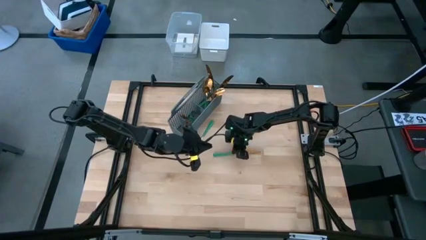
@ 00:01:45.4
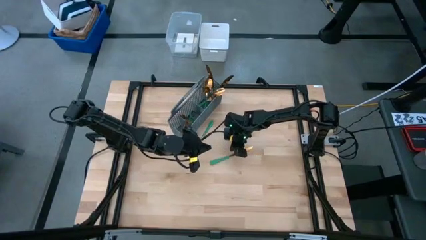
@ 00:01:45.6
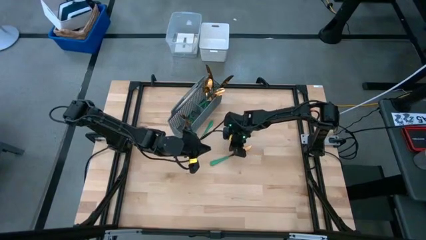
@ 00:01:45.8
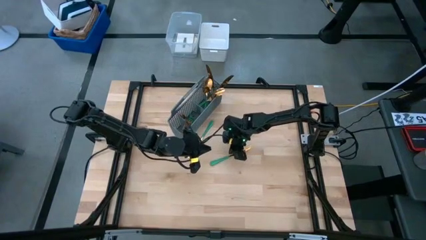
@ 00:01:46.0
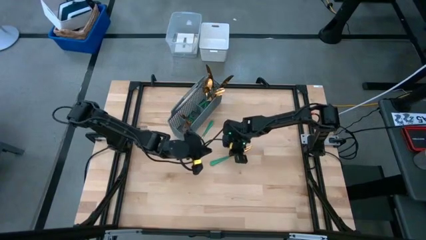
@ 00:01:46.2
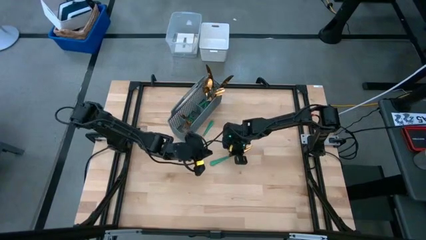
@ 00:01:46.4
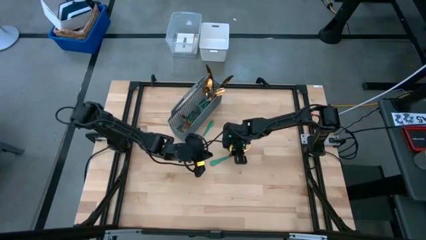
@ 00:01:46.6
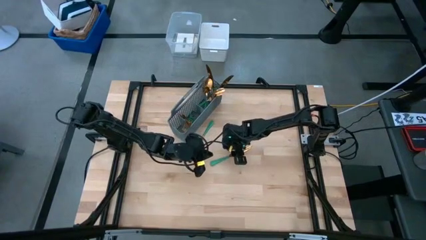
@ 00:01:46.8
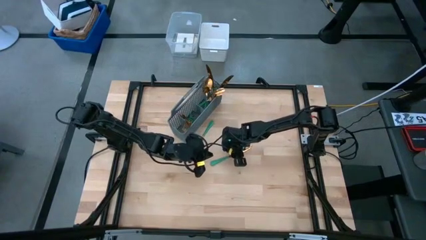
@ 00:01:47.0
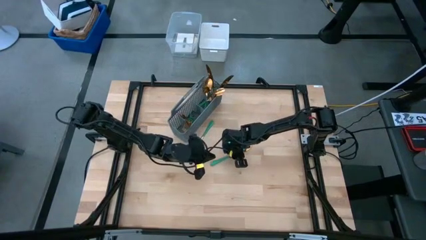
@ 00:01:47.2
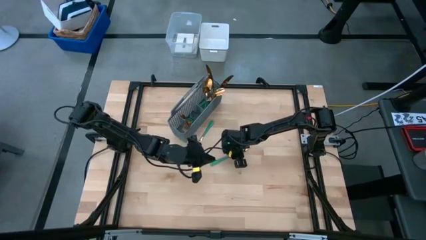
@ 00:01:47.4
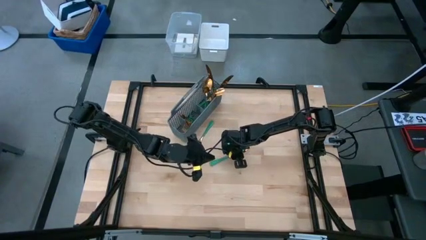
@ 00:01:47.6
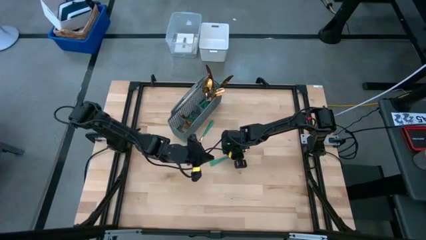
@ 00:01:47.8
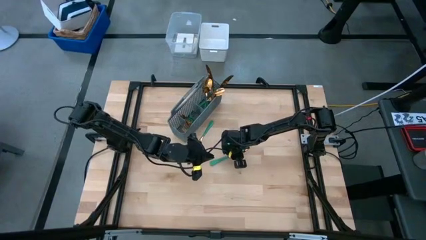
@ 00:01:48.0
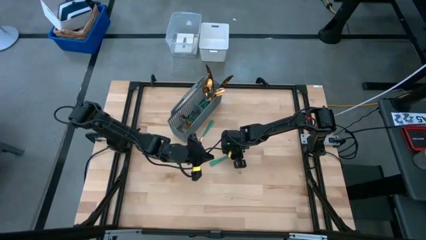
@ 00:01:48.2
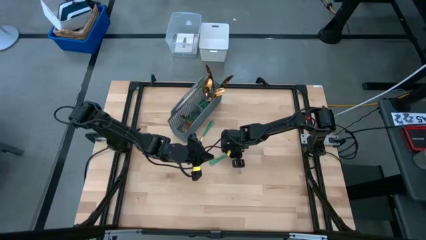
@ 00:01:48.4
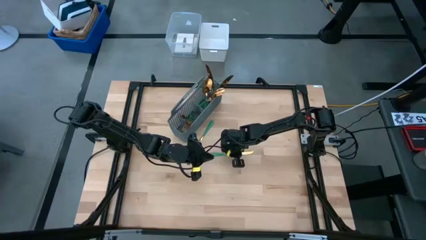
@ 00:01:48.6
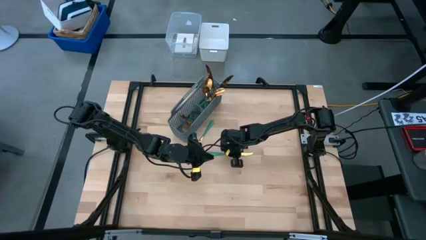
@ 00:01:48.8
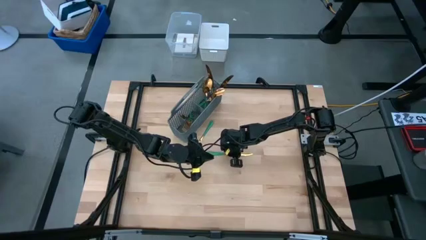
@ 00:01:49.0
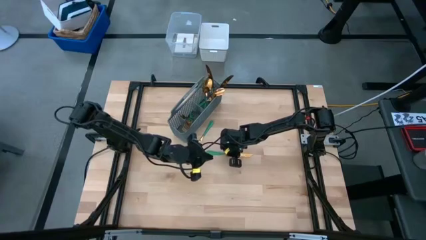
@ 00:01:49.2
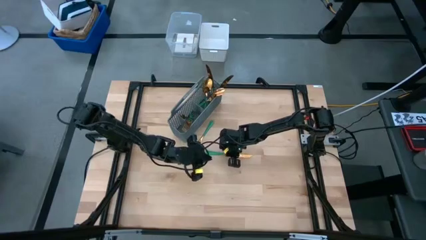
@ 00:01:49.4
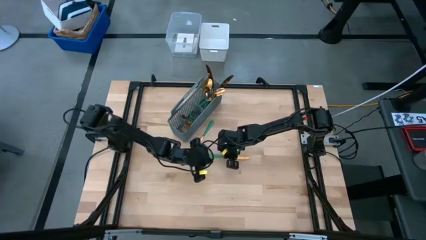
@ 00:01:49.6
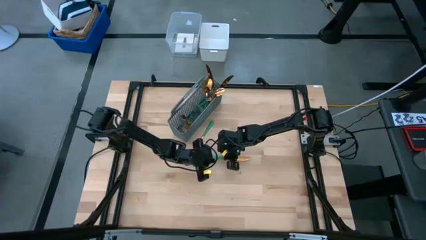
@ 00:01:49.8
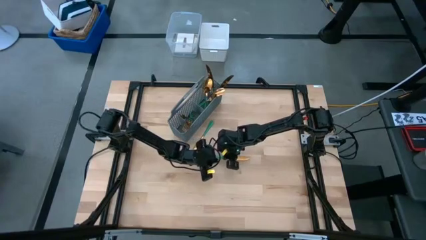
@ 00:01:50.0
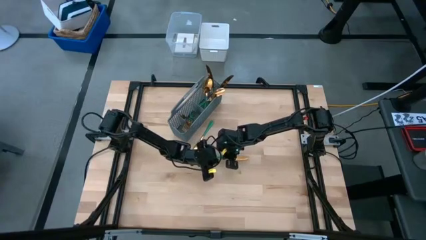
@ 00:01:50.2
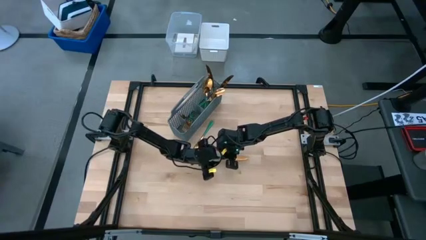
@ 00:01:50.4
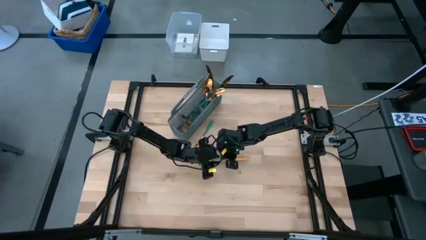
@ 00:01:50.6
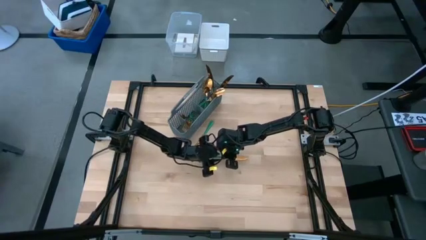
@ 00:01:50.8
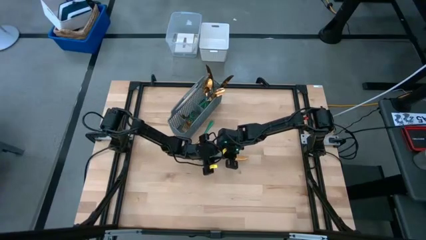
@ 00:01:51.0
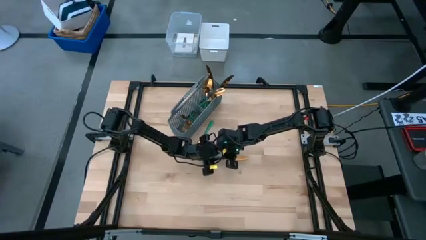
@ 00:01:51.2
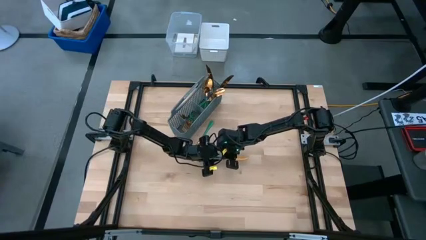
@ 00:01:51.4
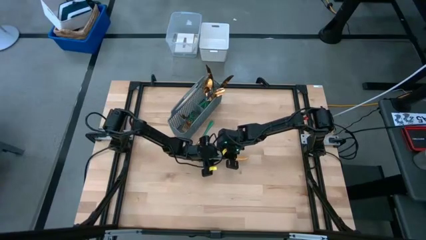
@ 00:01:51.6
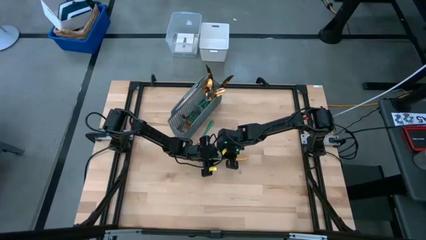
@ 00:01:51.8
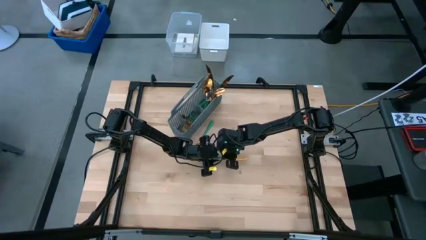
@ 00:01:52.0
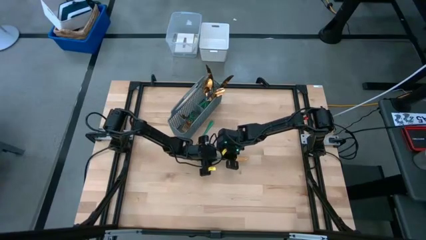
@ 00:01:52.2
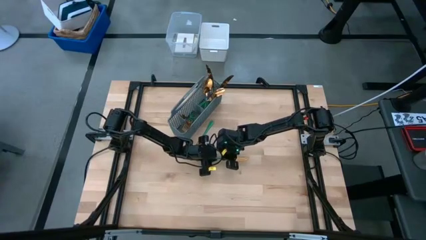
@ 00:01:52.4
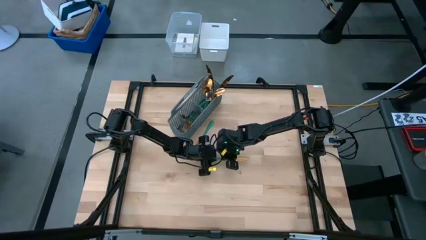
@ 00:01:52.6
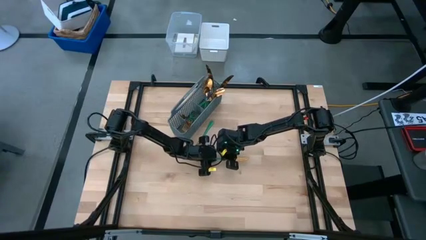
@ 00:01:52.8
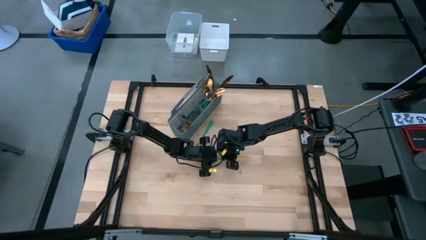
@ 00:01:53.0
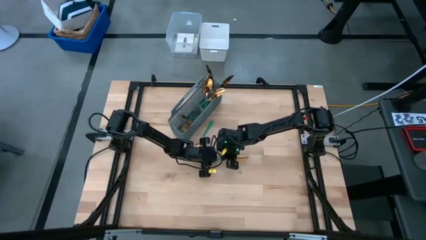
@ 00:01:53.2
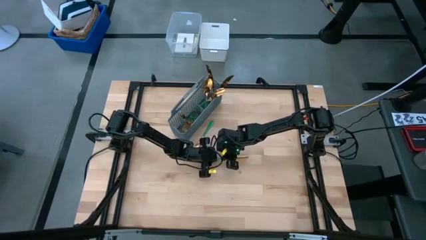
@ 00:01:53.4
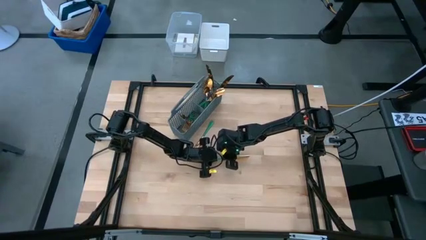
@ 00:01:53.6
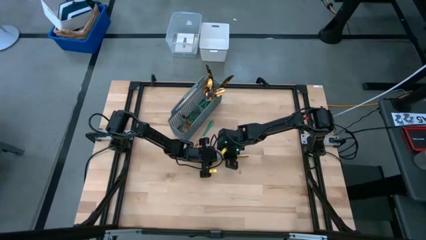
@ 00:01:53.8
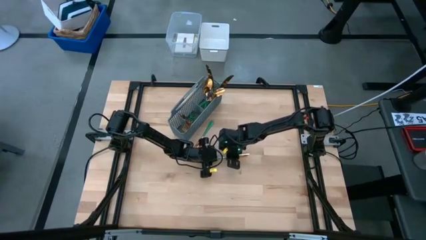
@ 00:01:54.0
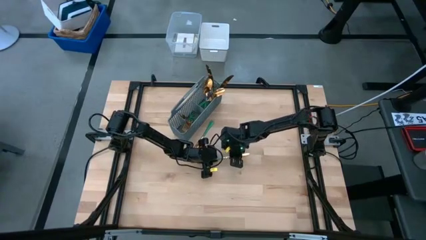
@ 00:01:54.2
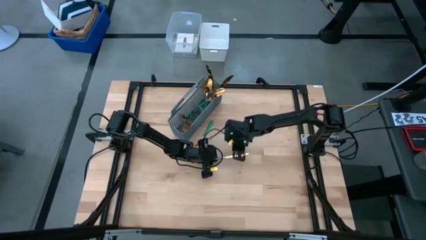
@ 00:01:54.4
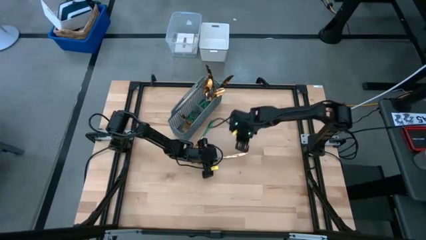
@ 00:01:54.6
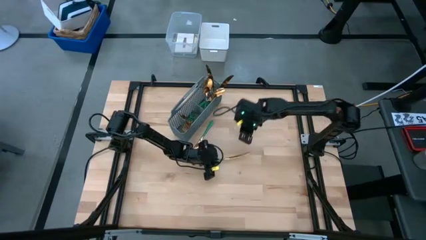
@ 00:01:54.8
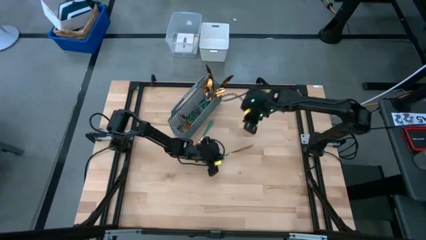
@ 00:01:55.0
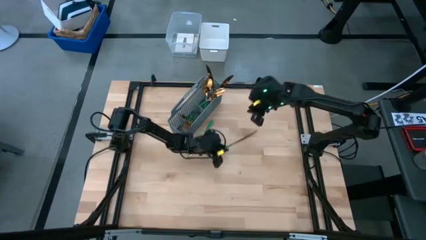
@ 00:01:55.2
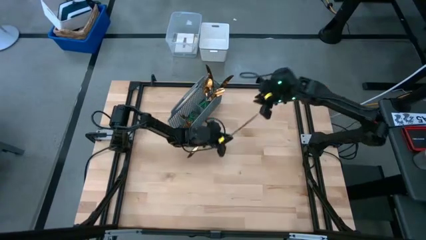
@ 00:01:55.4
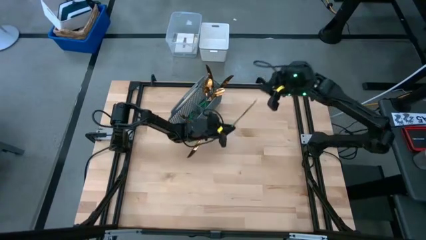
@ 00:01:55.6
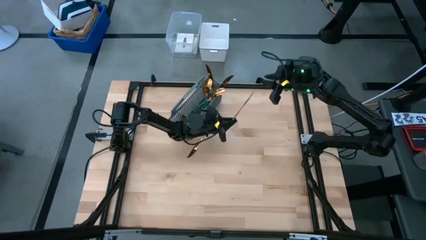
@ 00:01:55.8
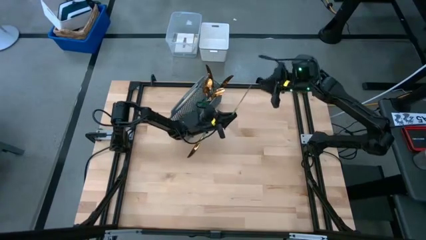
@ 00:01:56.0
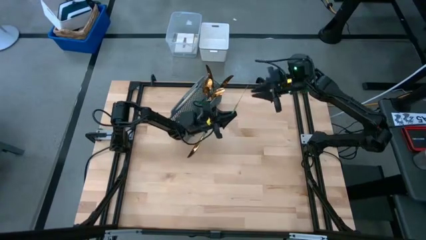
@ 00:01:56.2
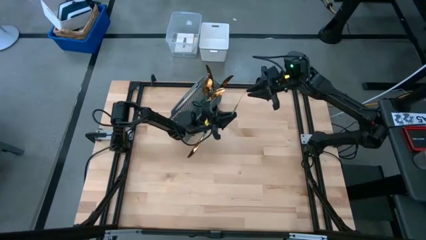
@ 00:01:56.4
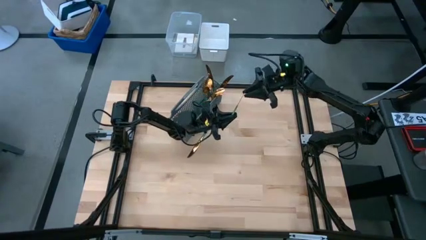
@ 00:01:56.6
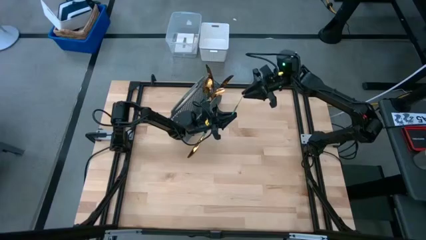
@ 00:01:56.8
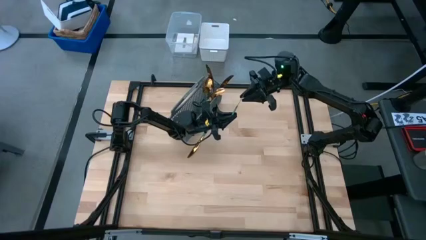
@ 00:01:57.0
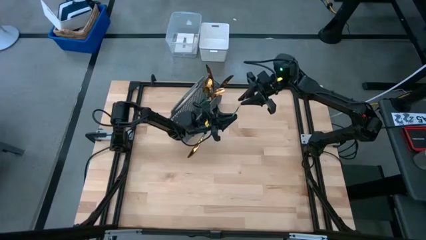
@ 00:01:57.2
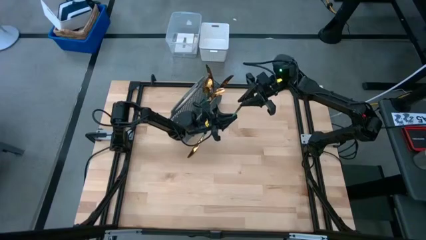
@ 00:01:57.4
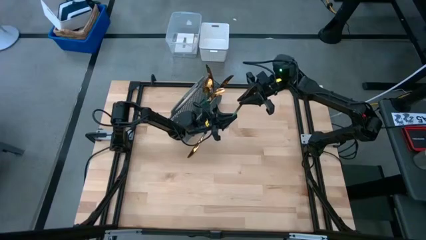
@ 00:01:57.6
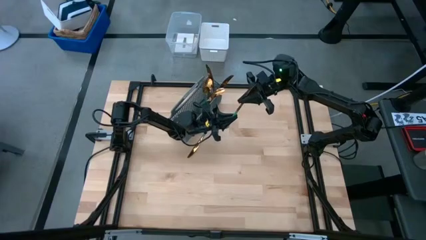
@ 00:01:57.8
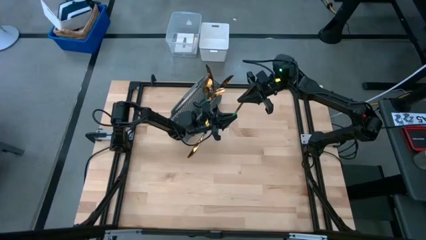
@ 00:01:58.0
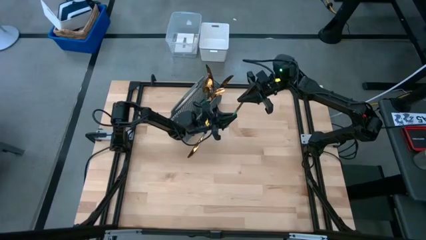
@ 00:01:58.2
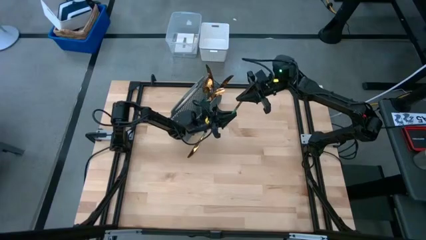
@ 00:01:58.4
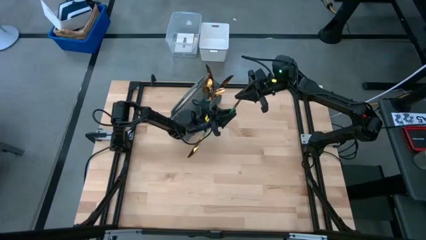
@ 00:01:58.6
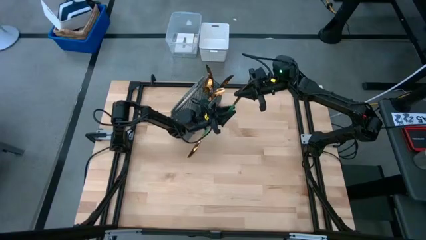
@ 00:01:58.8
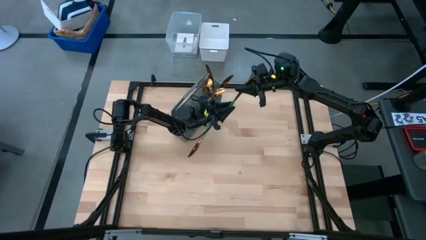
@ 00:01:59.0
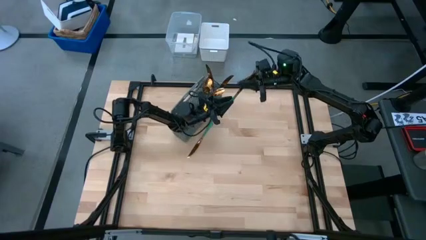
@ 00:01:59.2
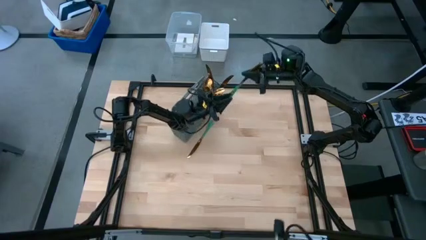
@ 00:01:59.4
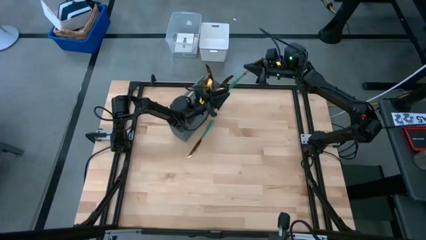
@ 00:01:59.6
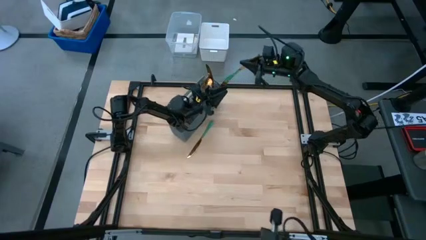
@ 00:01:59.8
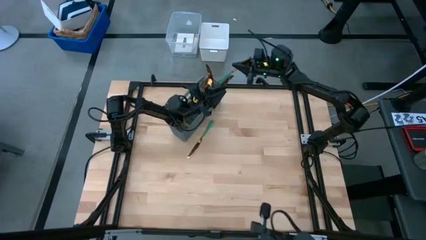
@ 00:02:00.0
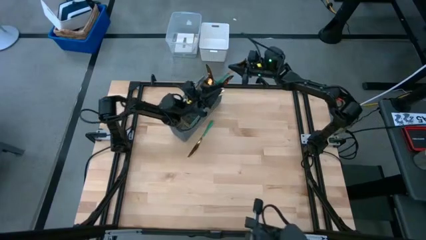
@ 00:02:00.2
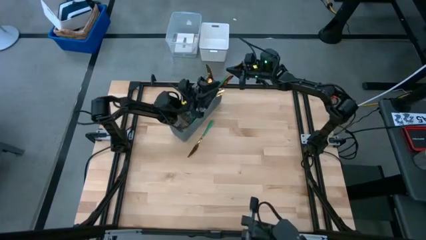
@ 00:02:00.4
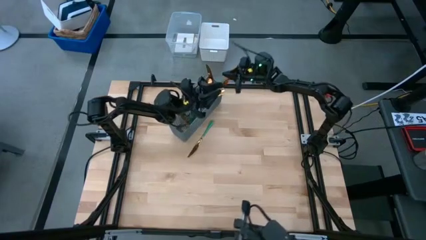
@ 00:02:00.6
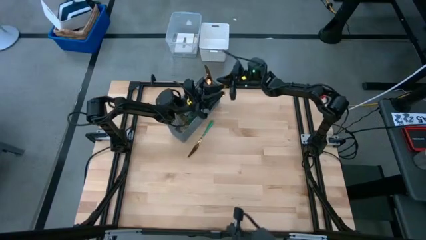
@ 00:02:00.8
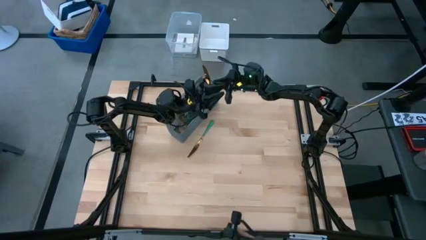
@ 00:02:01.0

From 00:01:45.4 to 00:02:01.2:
Task: Sort silverware
Put the right green-gold table knife into the silverware basket
